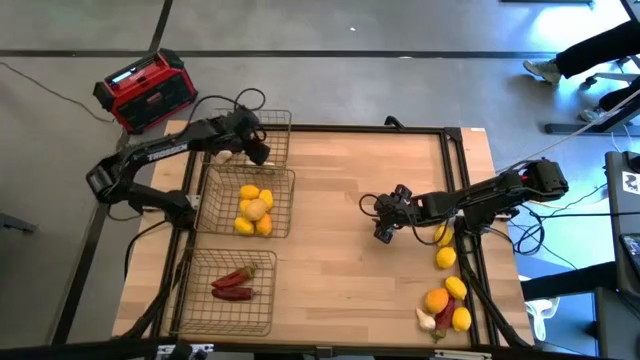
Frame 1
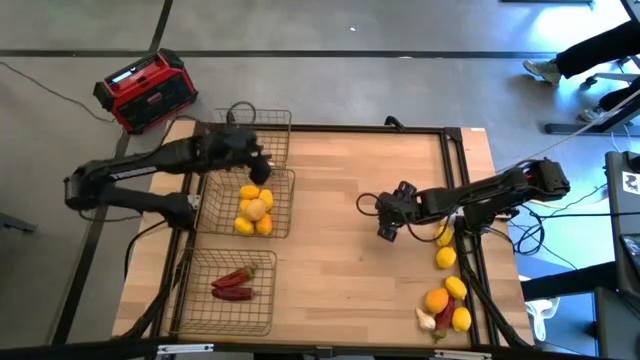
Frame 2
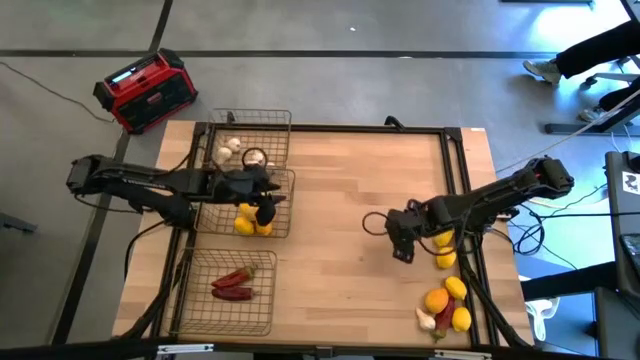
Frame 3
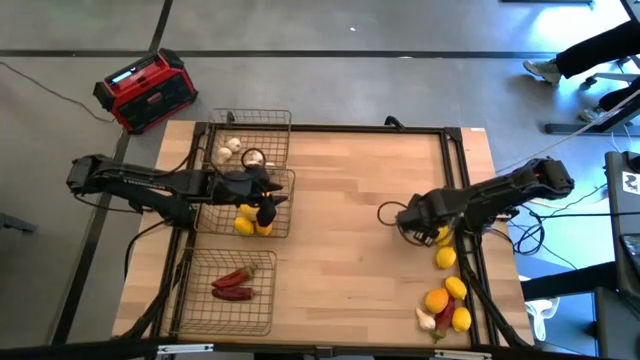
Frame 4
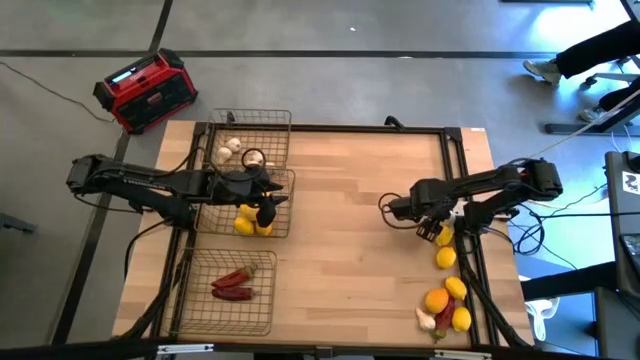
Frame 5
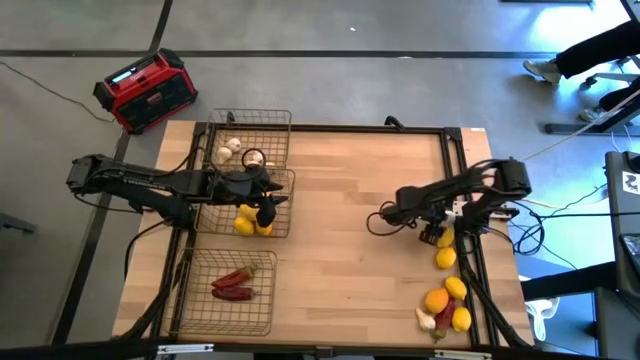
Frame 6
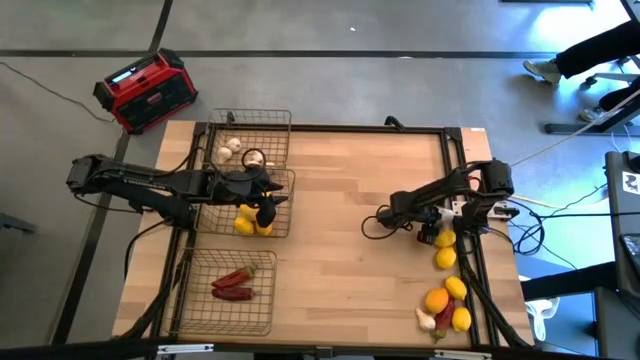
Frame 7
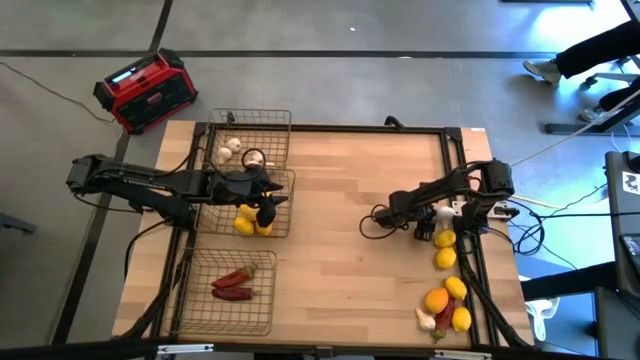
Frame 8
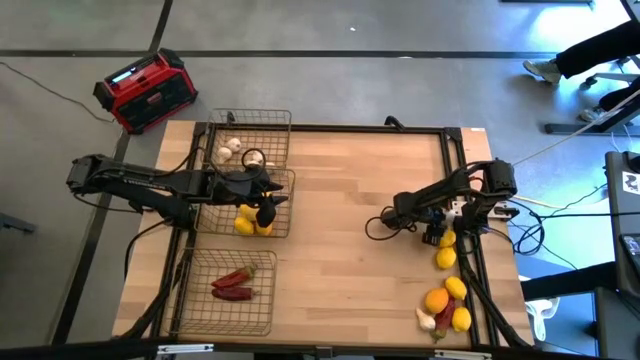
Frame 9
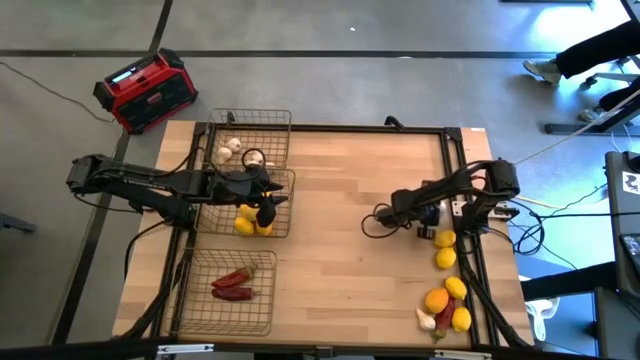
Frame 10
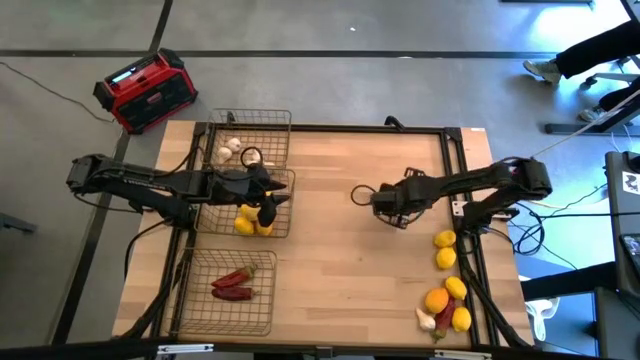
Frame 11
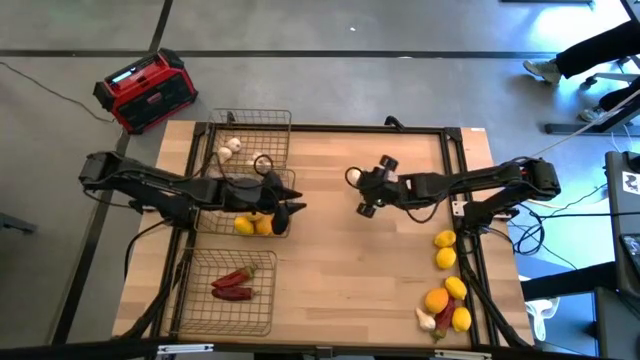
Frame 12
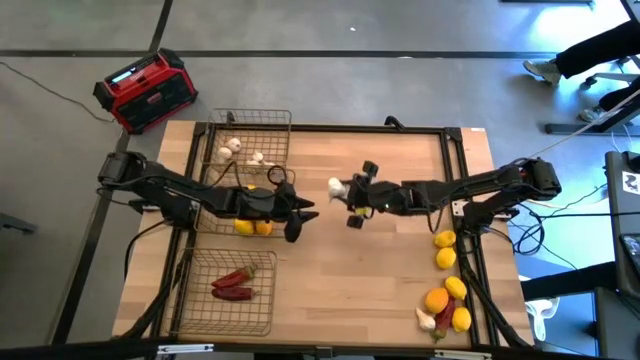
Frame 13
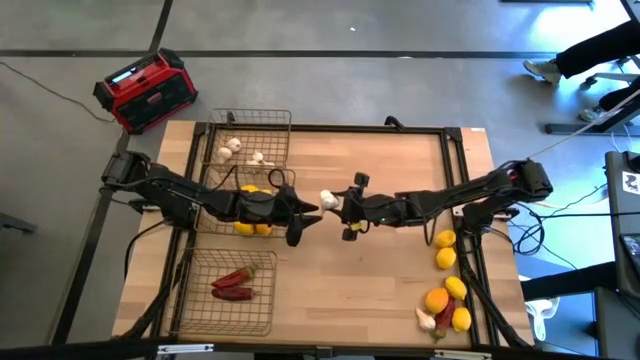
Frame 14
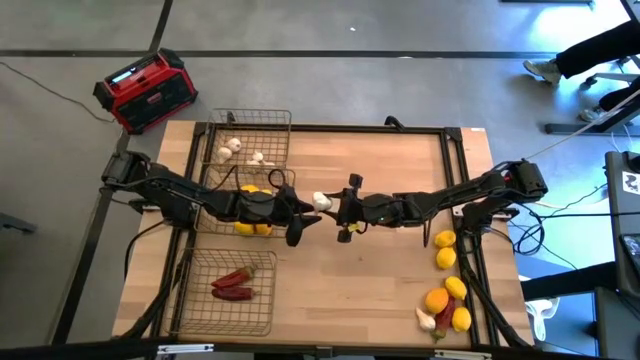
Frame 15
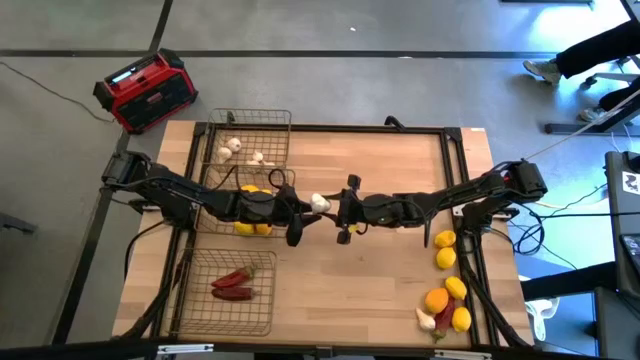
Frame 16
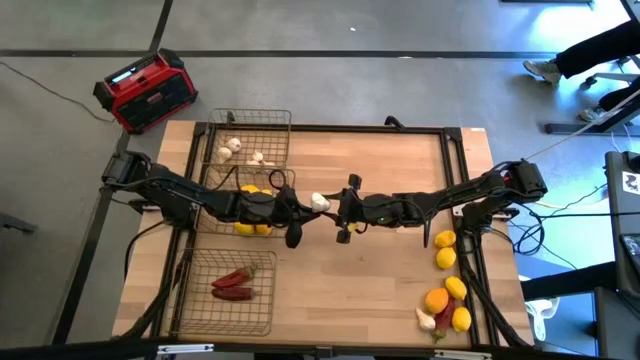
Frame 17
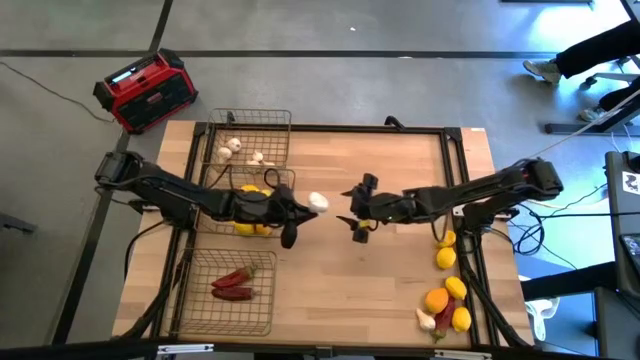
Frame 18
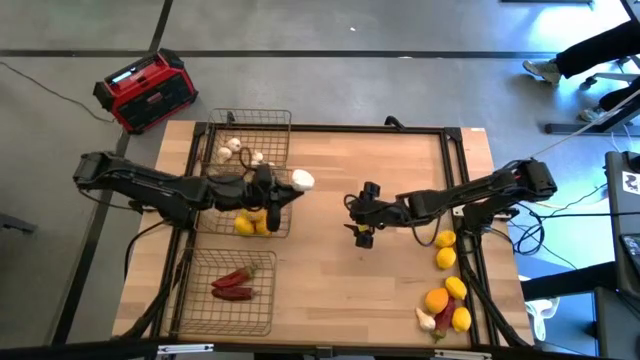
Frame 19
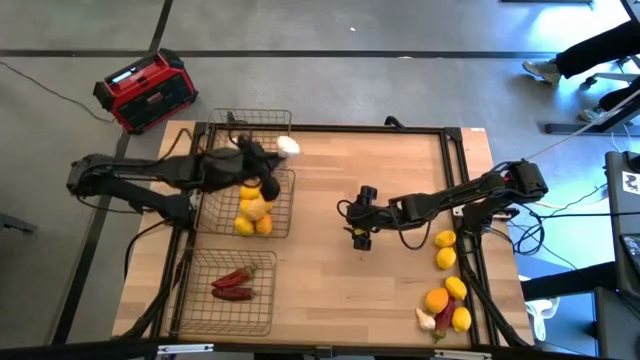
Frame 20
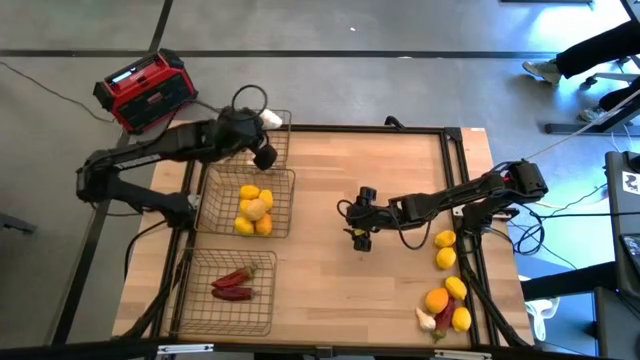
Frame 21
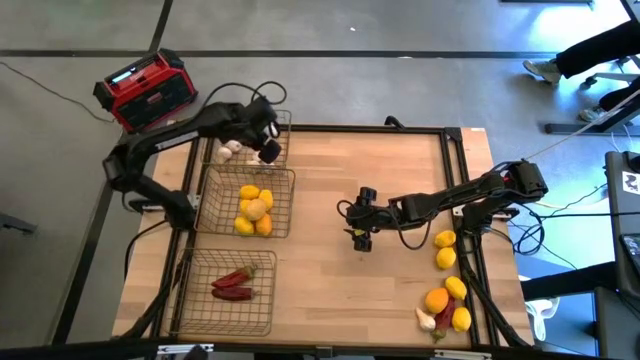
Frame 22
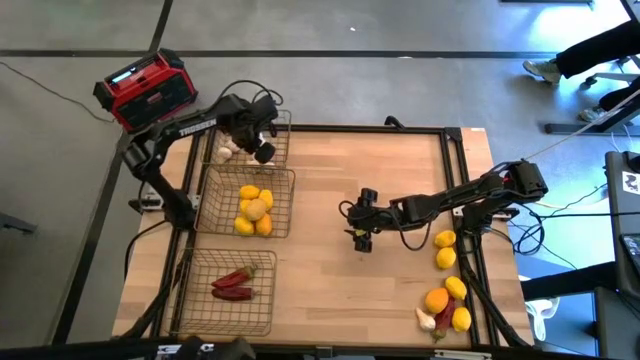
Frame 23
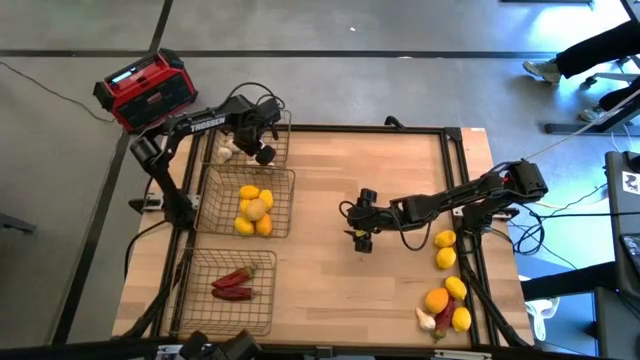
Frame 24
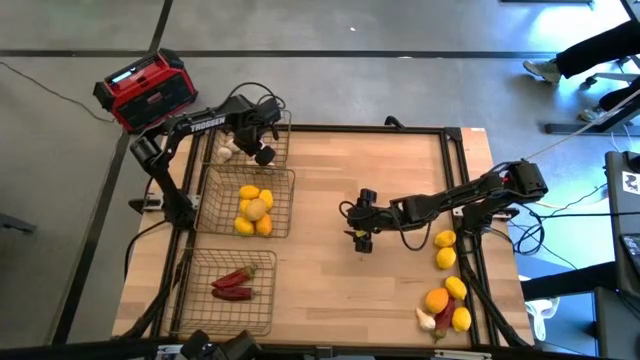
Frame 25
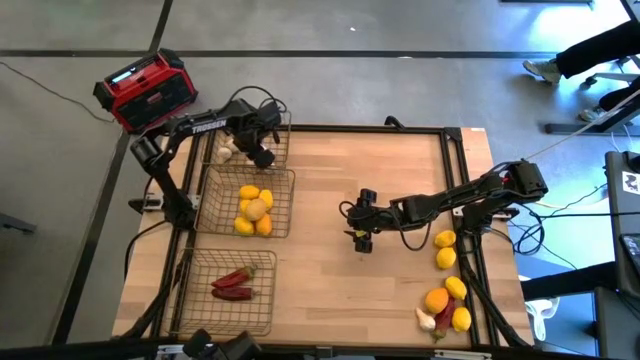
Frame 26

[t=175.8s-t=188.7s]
Task: Sort produce into baskets
Put the garlic in the top wire basket

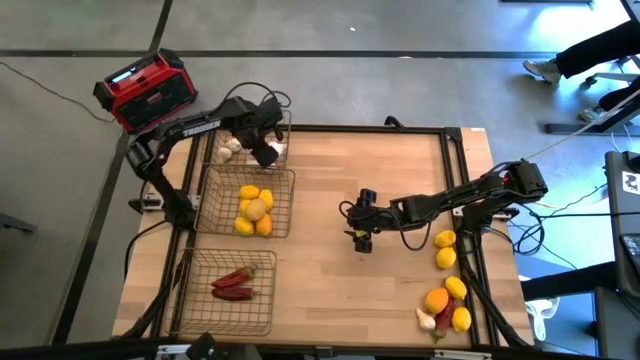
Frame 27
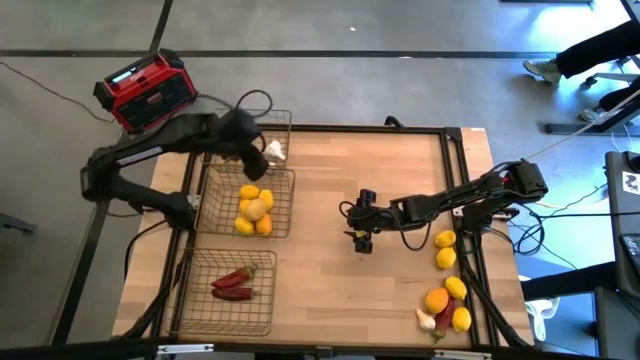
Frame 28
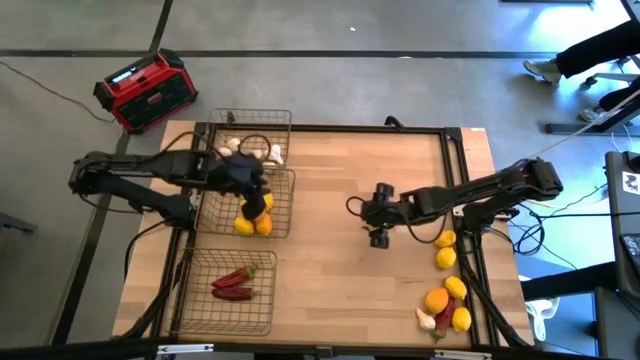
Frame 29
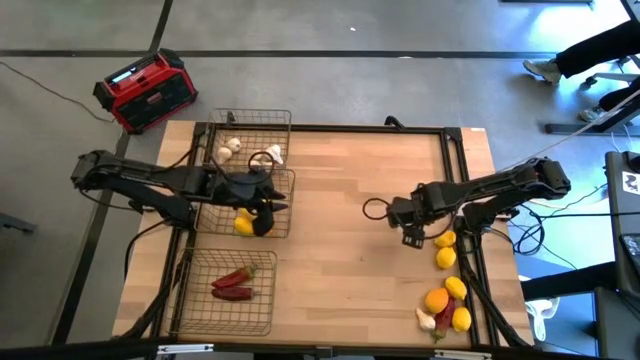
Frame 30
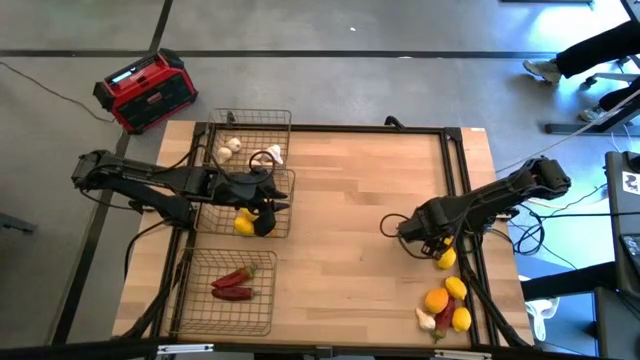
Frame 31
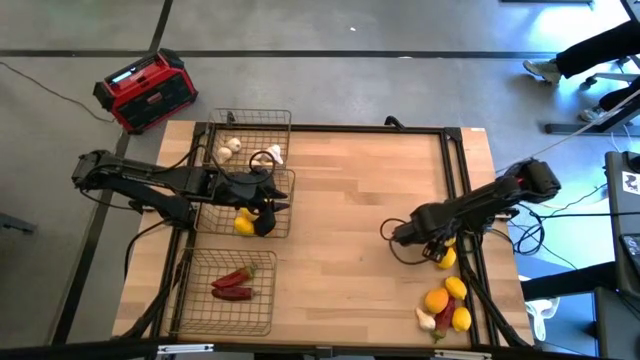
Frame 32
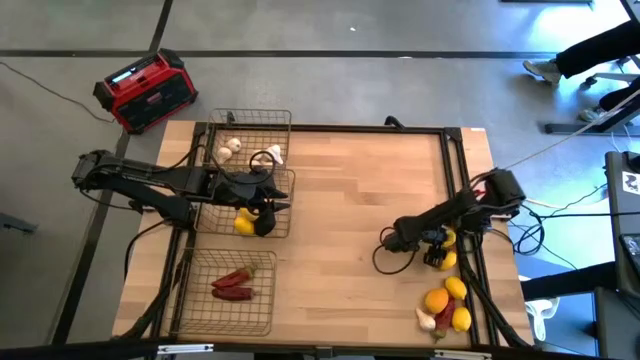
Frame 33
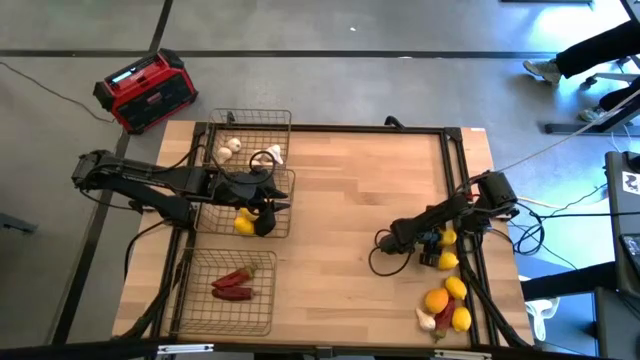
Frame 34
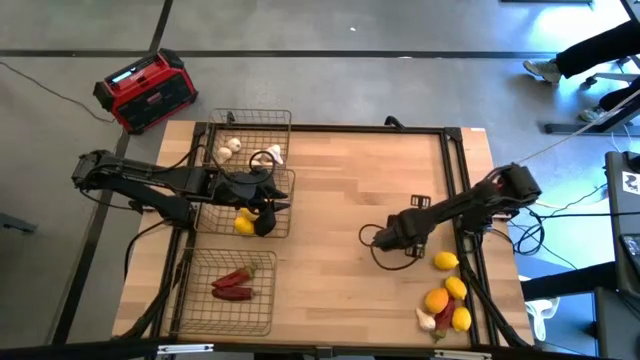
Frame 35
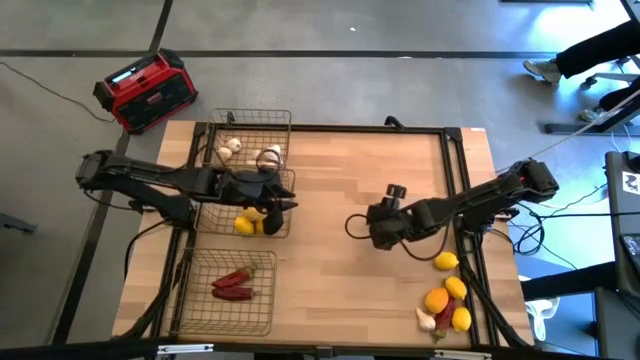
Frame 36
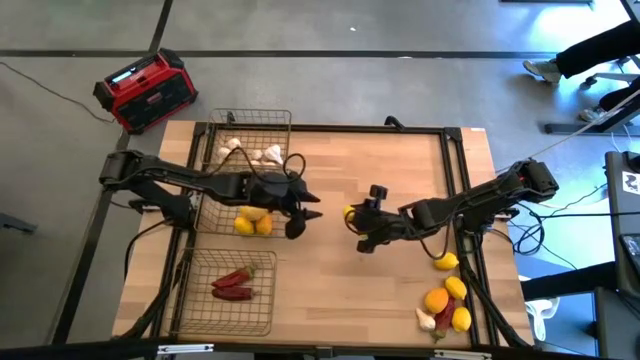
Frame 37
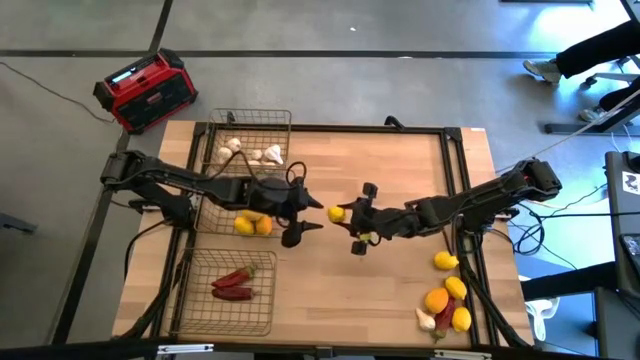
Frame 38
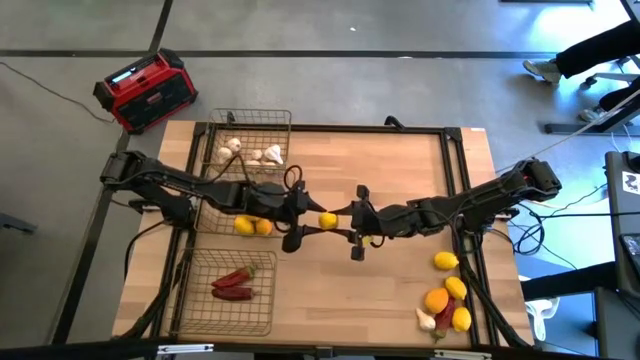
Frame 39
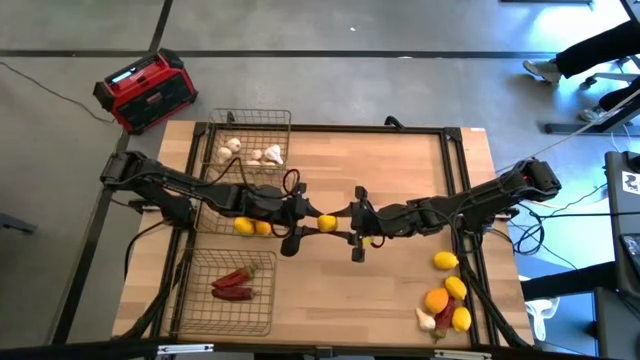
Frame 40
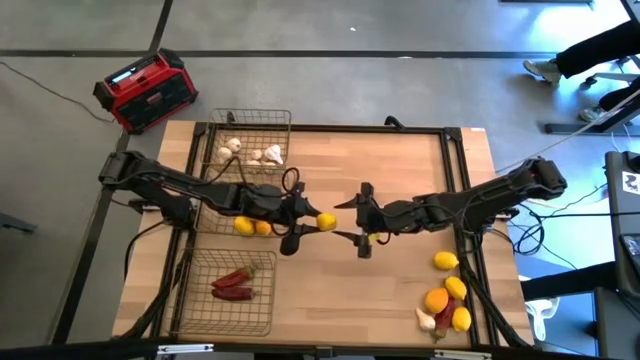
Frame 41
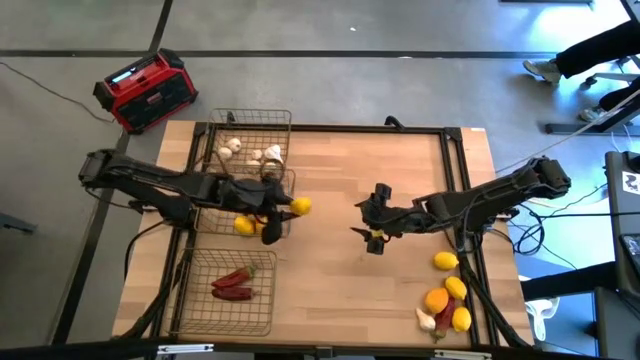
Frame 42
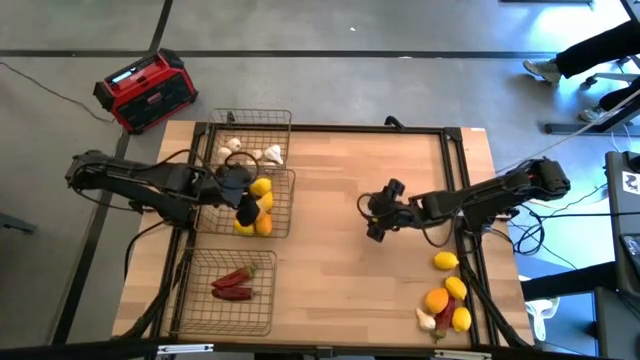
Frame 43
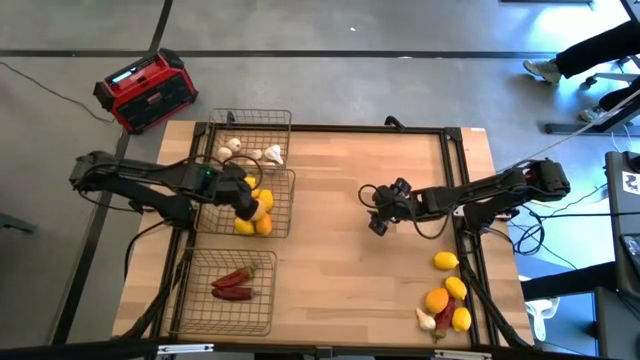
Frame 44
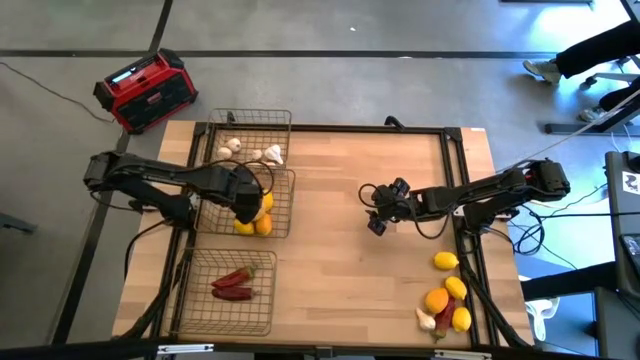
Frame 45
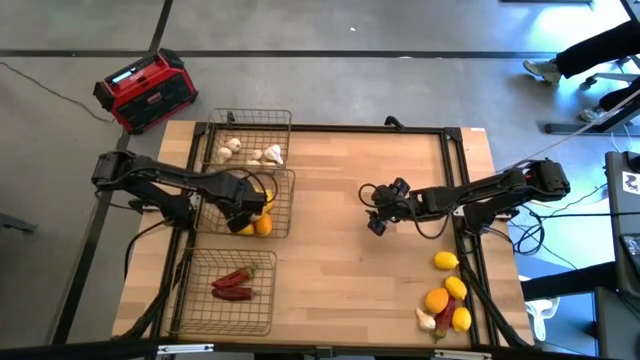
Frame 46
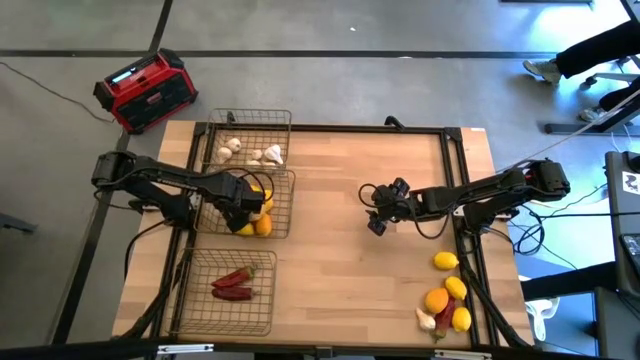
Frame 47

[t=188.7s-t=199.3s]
Put the lemon in the middle wire basket
